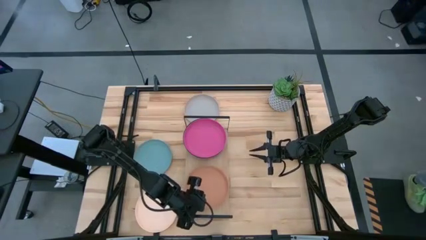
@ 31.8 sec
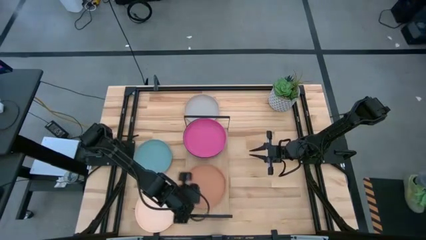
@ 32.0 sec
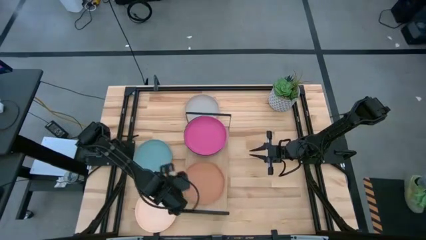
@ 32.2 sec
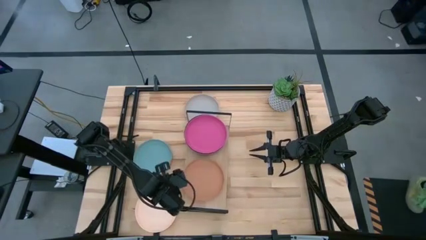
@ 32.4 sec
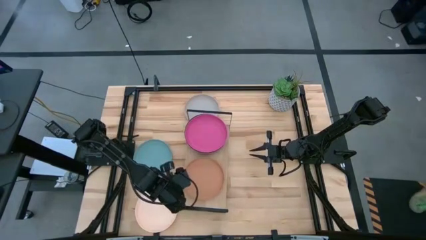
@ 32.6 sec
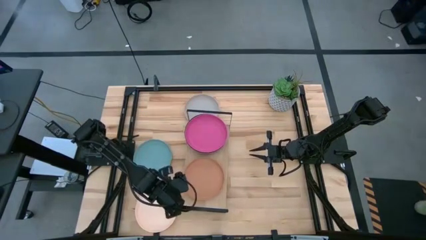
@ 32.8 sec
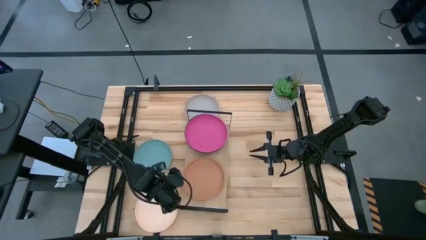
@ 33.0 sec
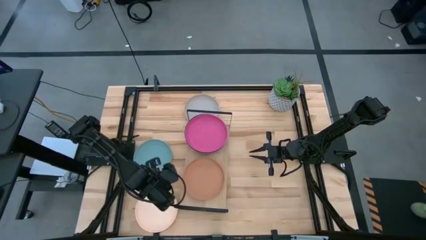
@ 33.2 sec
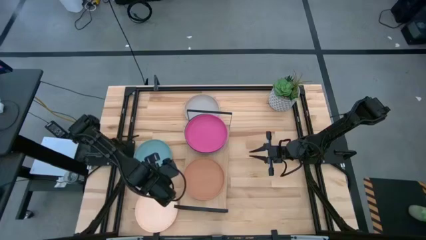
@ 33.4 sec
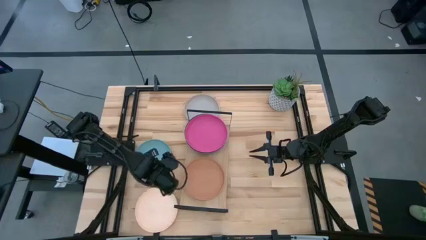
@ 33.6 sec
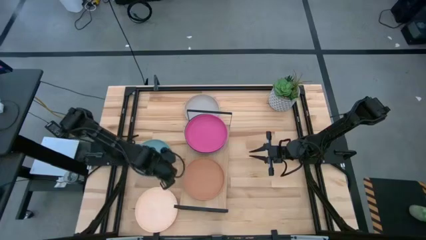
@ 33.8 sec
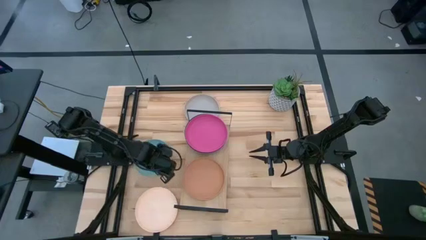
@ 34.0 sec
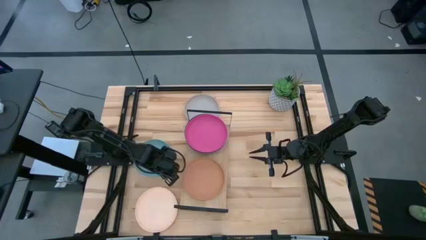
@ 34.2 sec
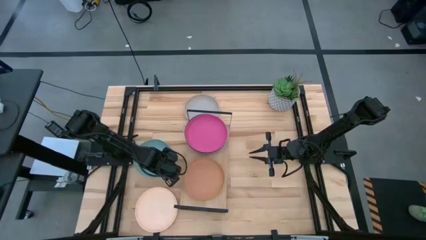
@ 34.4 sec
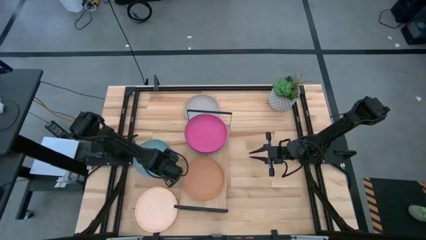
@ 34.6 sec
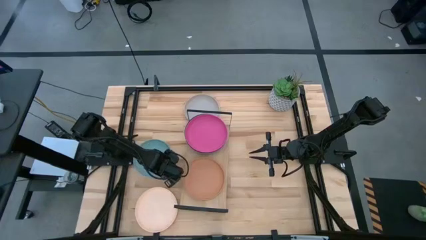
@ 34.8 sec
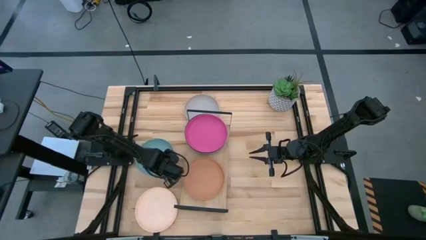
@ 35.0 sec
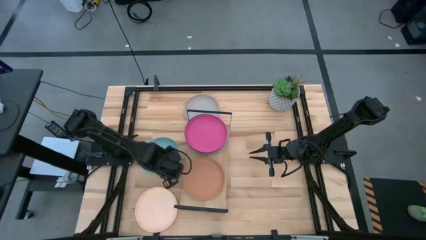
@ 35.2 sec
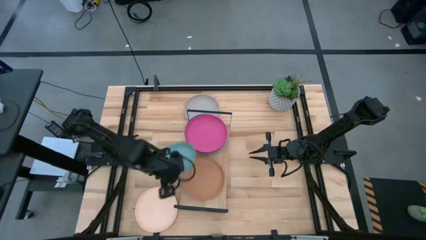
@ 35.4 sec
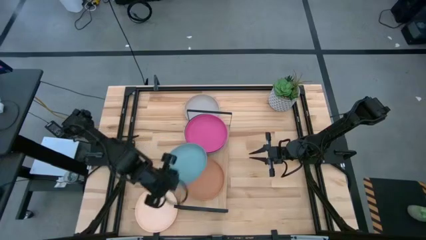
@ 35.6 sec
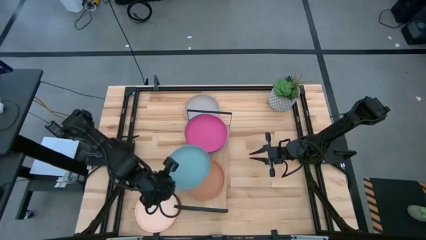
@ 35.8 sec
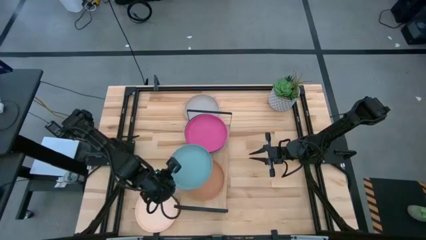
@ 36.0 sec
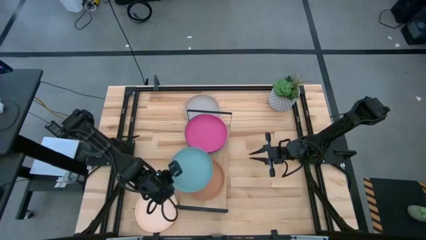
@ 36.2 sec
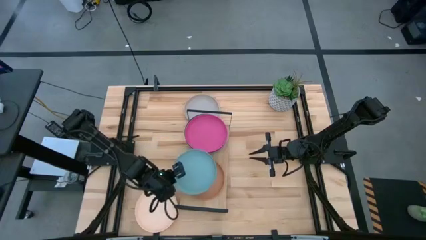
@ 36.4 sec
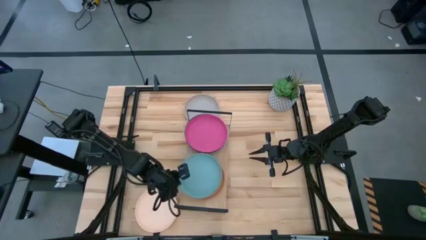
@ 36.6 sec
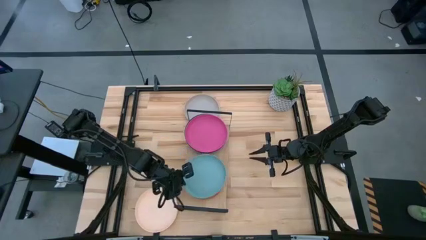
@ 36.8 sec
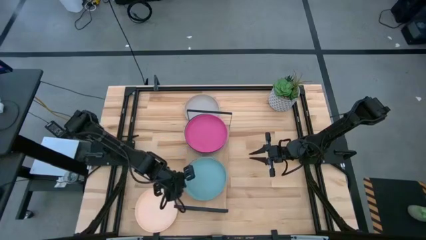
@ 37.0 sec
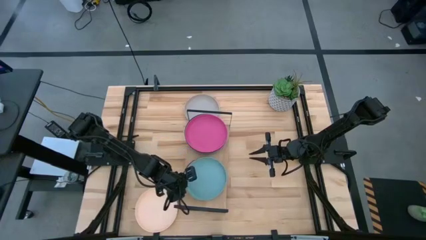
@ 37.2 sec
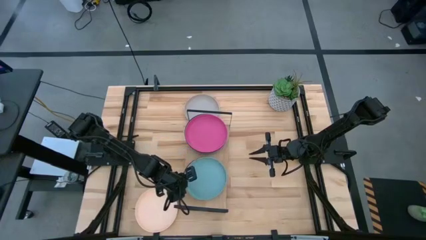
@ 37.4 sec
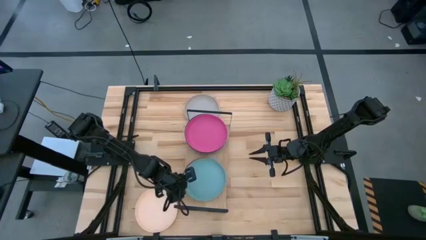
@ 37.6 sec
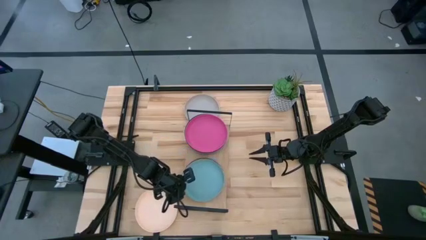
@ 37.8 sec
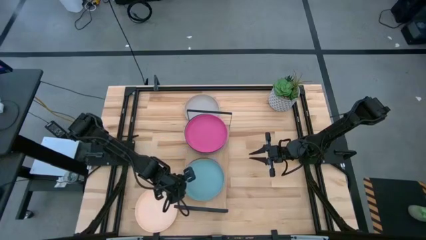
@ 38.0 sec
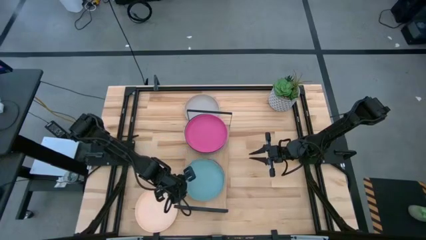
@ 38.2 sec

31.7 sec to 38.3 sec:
Task: Place and stack plates onto a shelf
Stack the light blue plate on top of the light brown plate

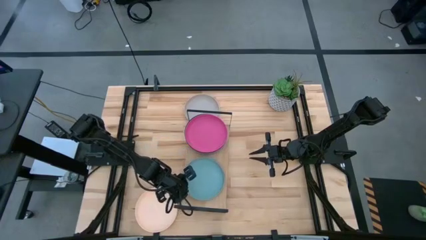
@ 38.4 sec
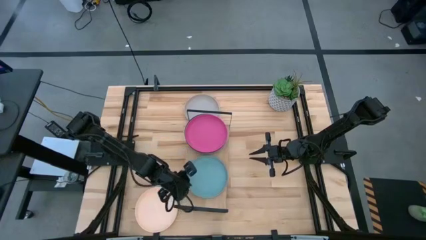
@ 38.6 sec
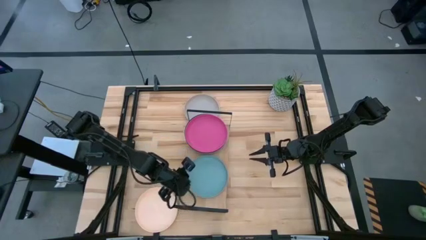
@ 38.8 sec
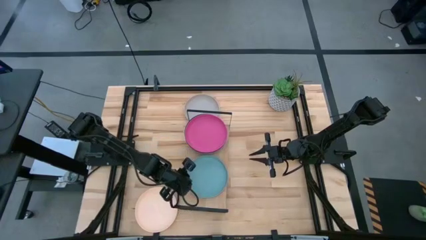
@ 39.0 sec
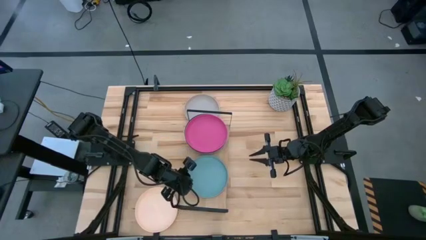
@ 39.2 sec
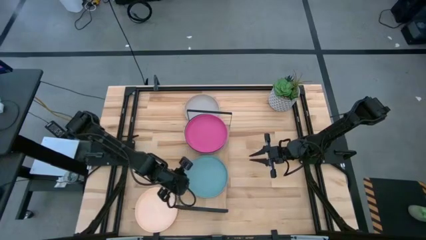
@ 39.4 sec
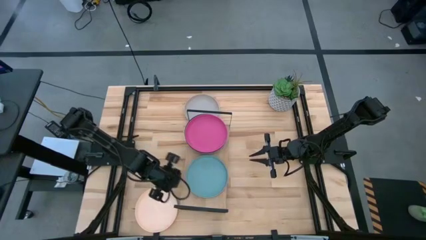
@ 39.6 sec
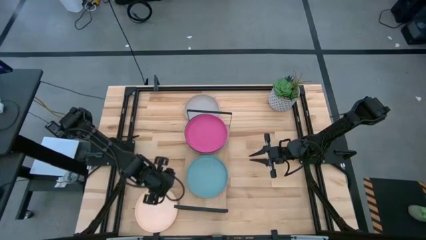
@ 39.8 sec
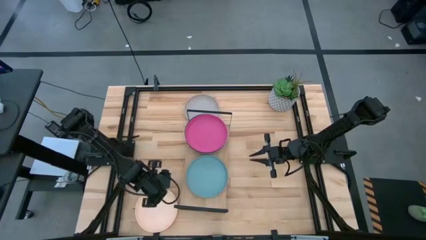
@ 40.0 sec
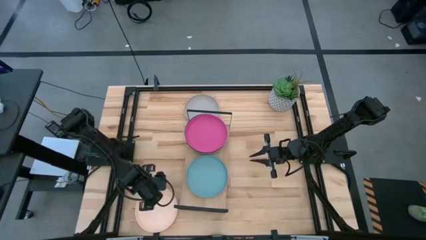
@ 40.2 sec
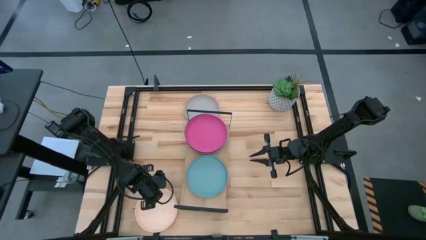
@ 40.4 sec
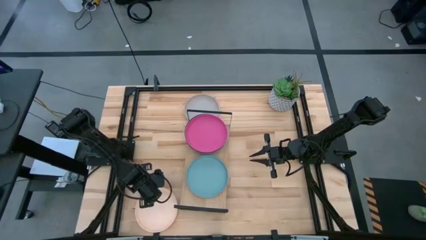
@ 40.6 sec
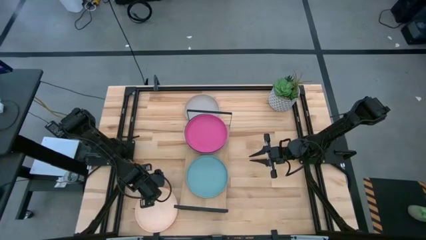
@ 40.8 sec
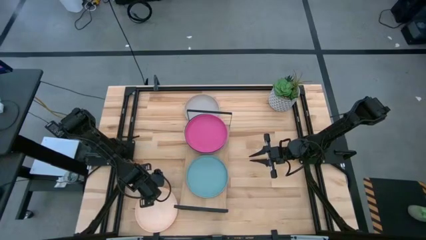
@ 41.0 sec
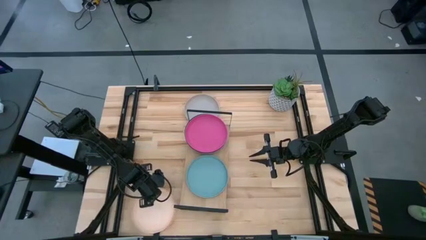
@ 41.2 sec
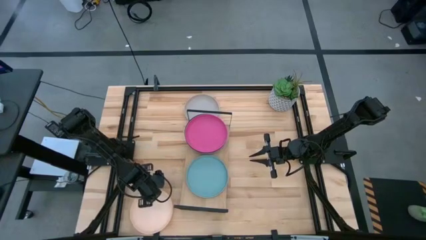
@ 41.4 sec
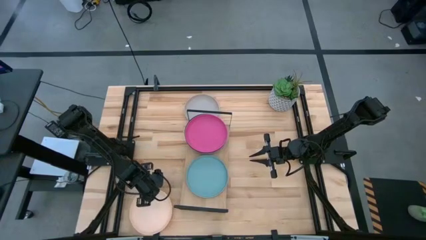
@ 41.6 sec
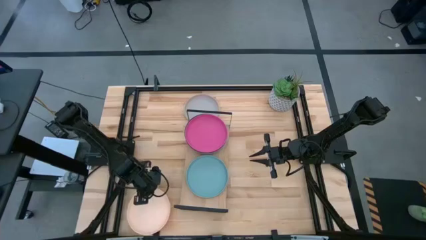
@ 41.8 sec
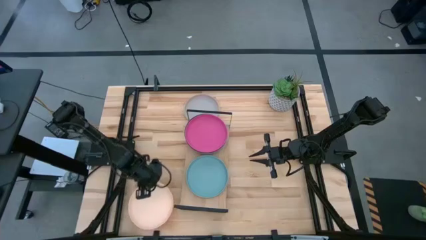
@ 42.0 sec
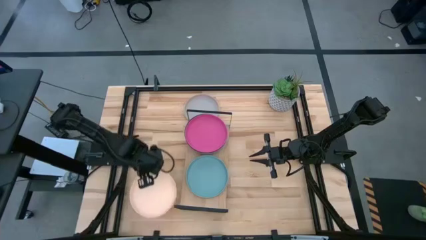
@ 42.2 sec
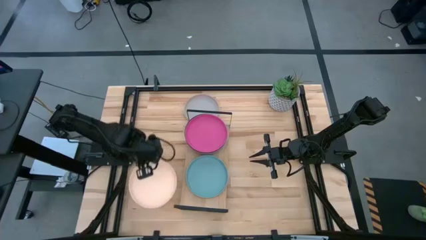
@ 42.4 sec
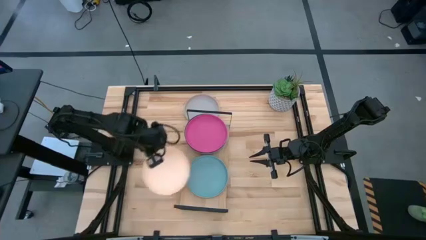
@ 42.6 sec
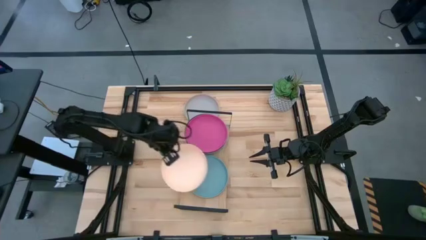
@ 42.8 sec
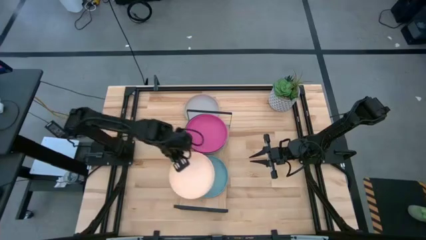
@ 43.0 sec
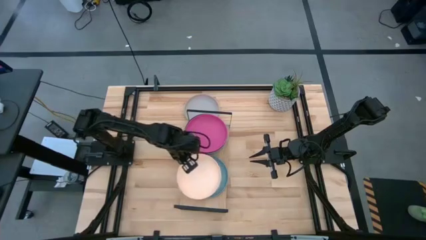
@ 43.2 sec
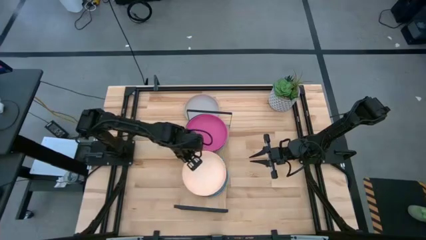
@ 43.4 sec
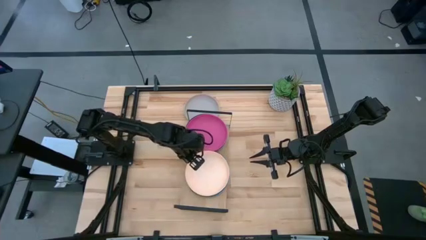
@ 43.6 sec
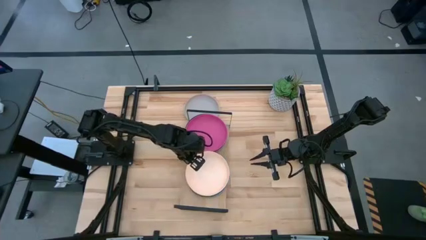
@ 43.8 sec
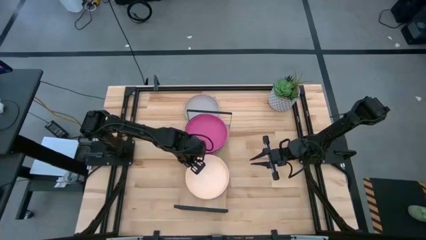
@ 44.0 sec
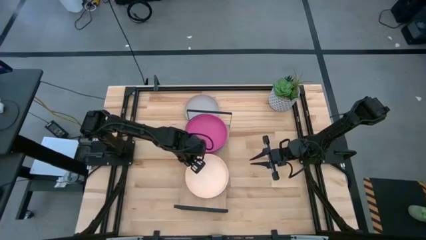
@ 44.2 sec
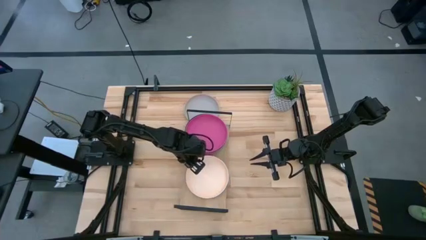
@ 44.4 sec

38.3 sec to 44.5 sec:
Stack the light orange plate on top of the light blue plate

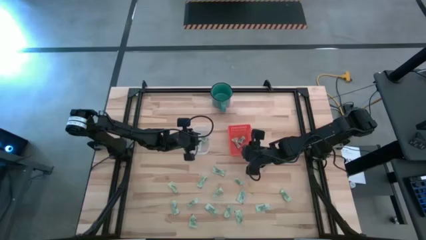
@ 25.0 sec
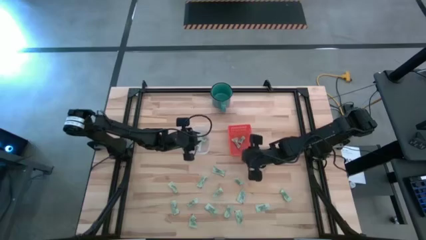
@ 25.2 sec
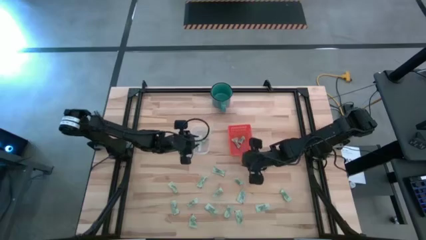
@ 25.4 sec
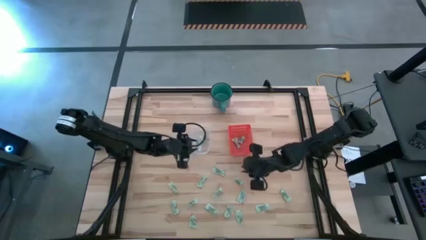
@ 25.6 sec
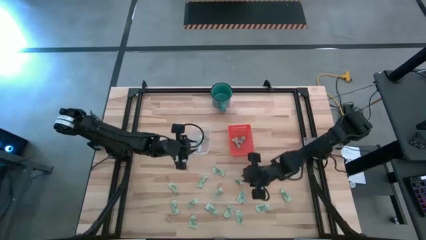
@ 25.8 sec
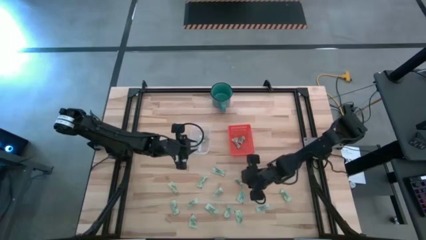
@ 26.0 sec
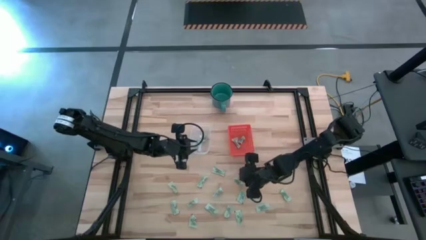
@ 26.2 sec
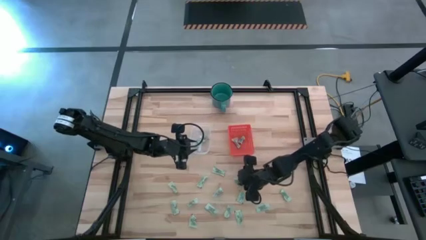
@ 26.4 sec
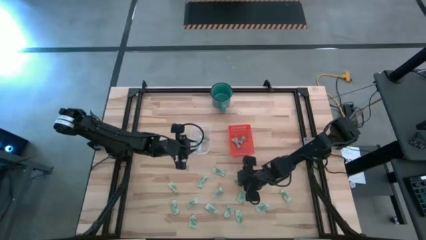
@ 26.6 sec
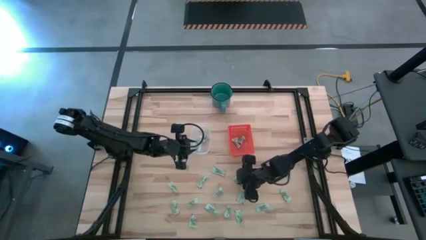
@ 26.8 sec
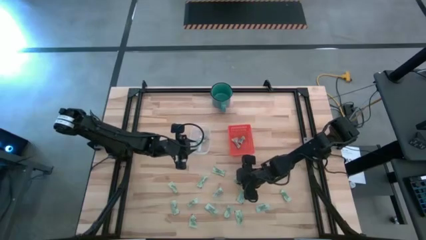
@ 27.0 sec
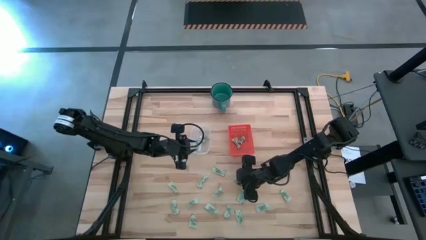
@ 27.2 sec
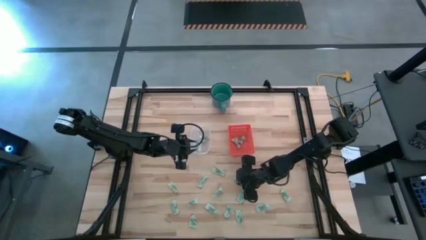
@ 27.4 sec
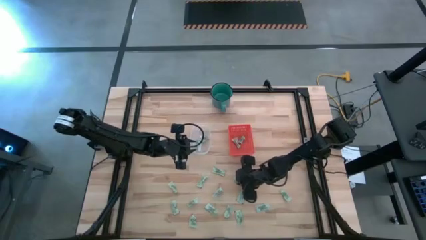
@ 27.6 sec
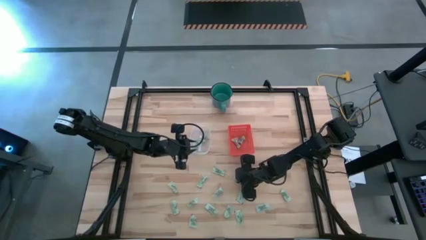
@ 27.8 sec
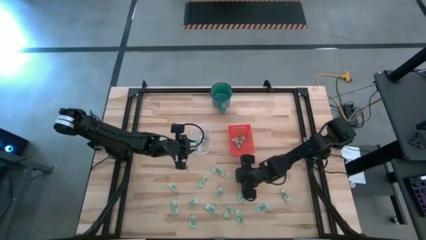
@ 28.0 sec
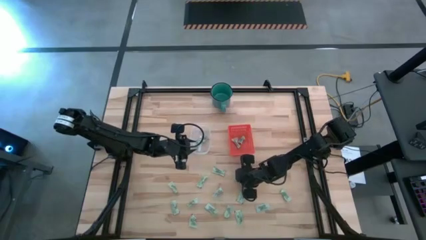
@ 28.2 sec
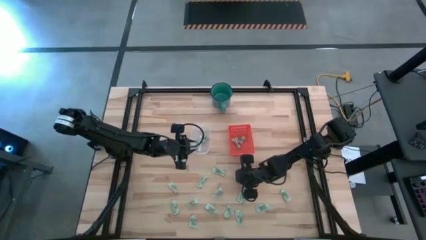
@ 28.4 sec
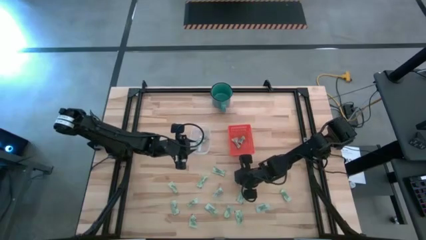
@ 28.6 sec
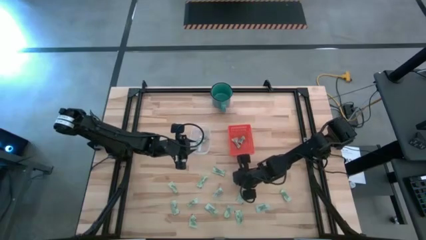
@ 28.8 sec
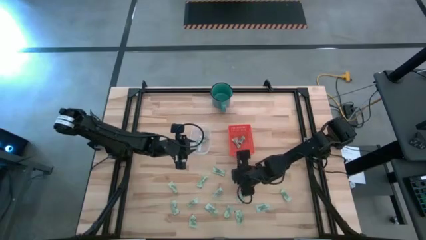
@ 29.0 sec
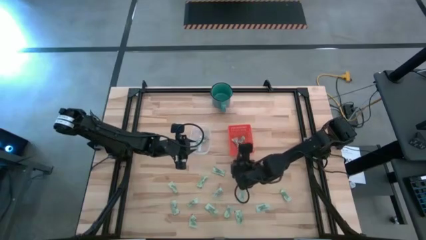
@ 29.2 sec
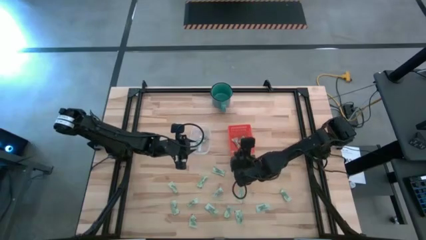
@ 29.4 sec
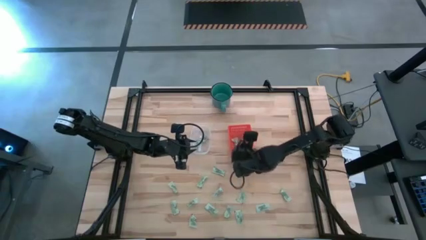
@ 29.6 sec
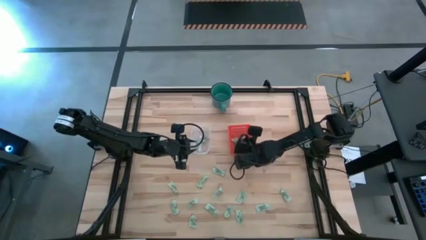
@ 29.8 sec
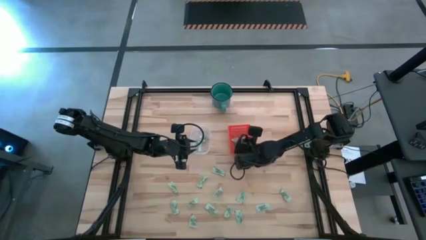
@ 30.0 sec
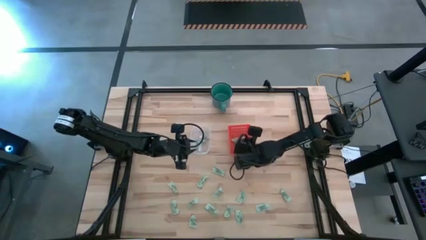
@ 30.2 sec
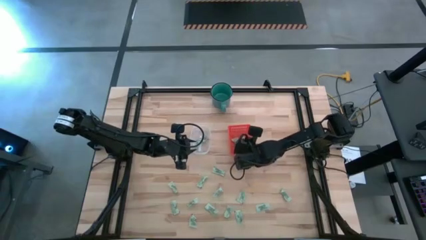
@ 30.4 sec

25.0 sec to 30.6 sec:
Task: Pick and place items into bin
Put the stevia packet into the orange bin
